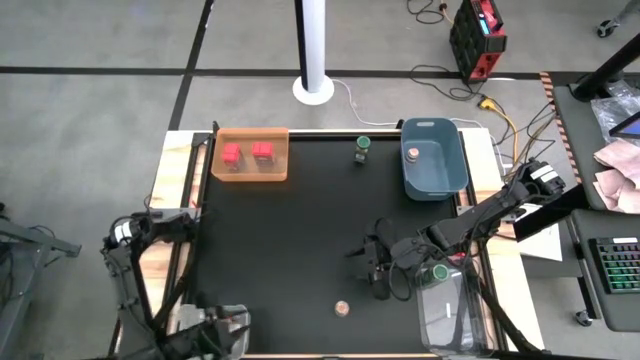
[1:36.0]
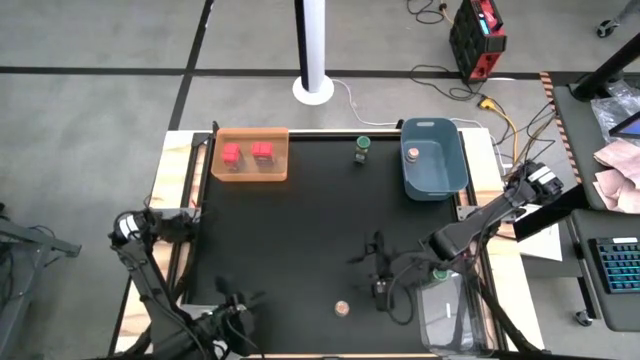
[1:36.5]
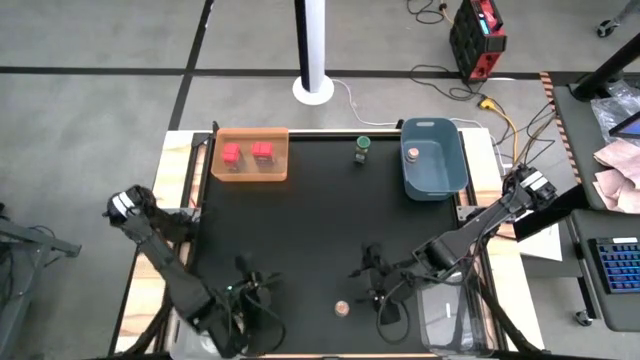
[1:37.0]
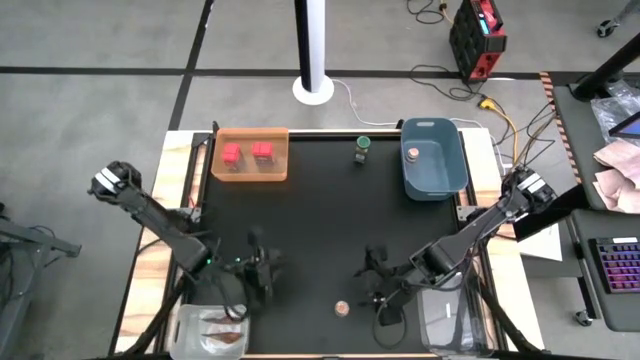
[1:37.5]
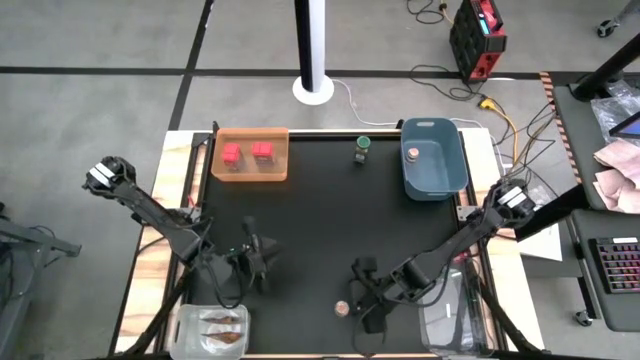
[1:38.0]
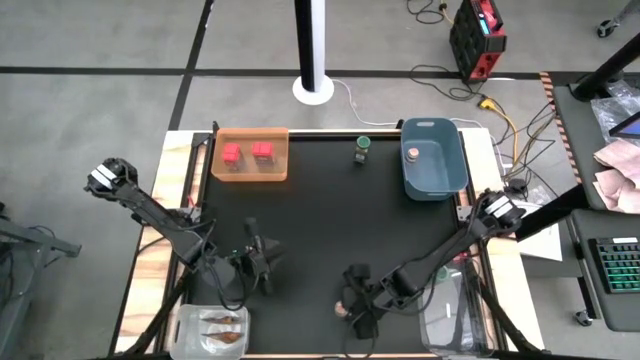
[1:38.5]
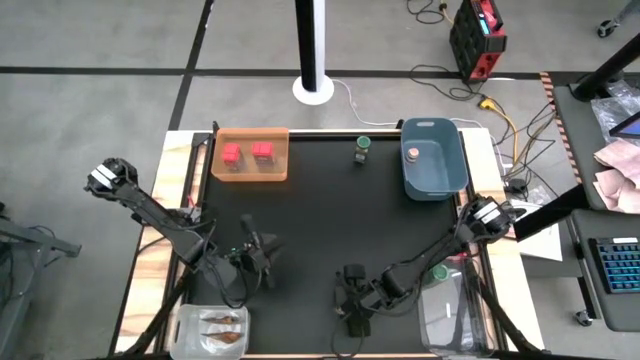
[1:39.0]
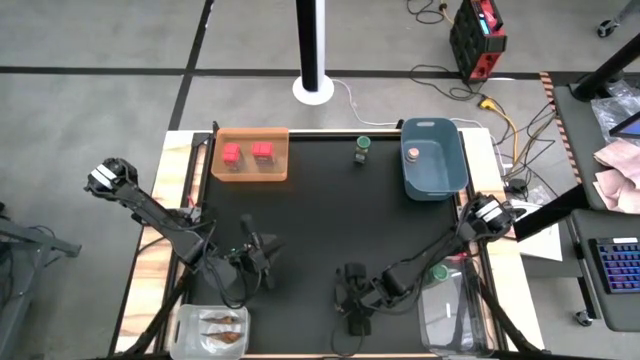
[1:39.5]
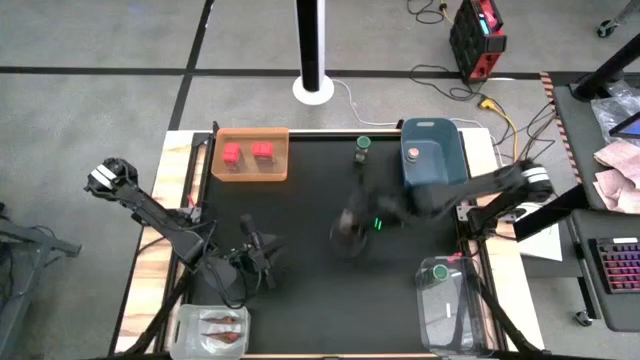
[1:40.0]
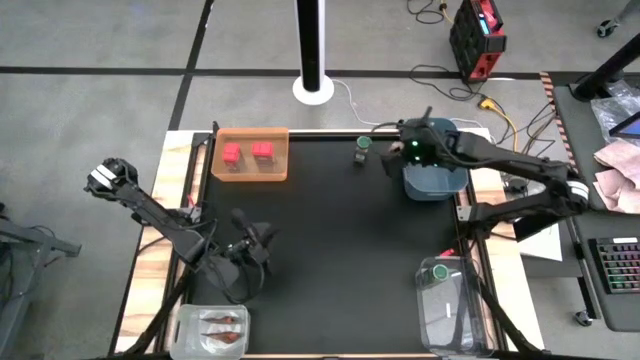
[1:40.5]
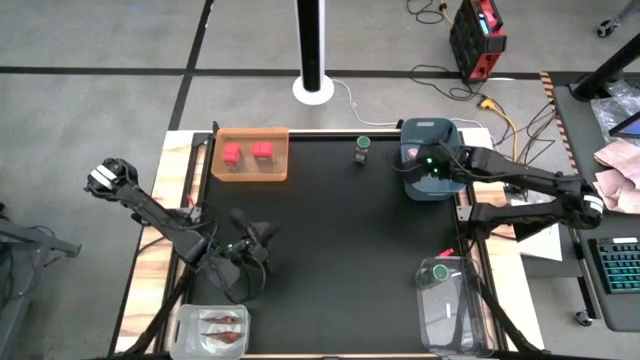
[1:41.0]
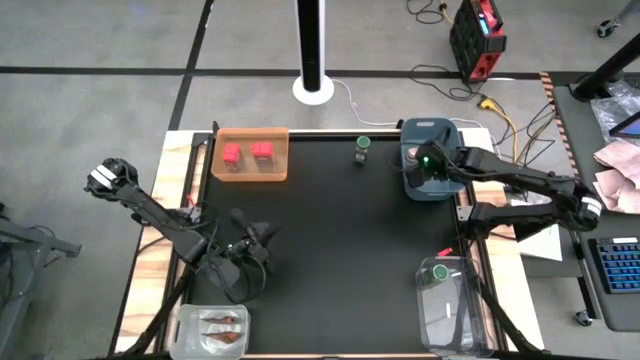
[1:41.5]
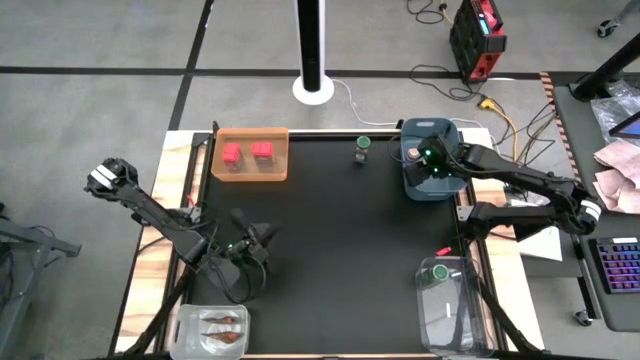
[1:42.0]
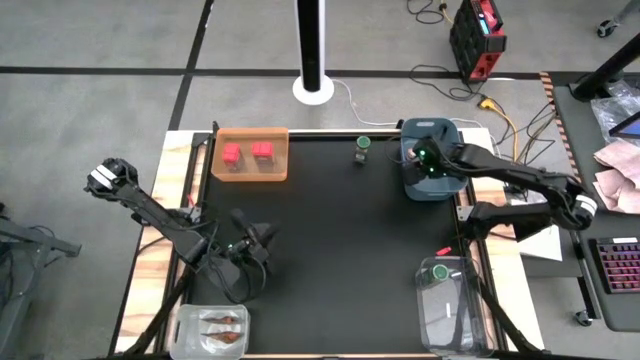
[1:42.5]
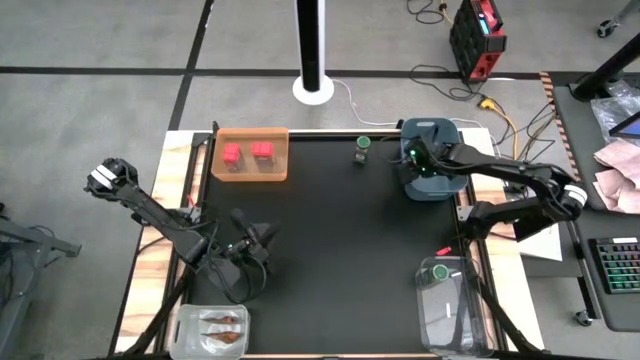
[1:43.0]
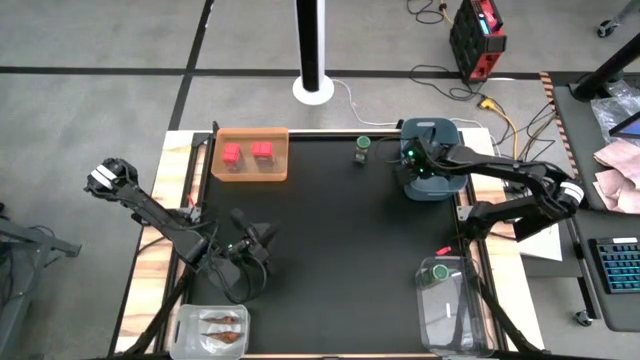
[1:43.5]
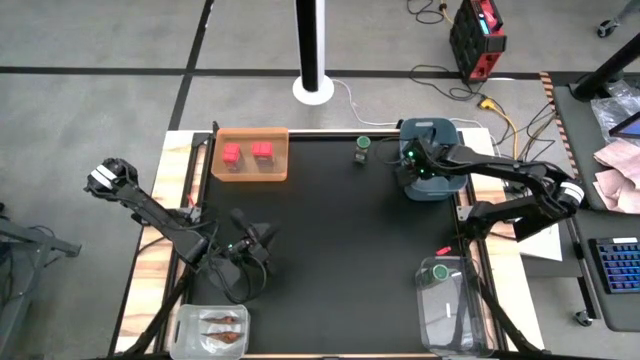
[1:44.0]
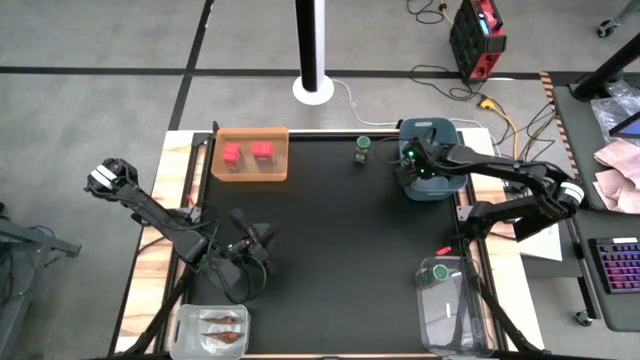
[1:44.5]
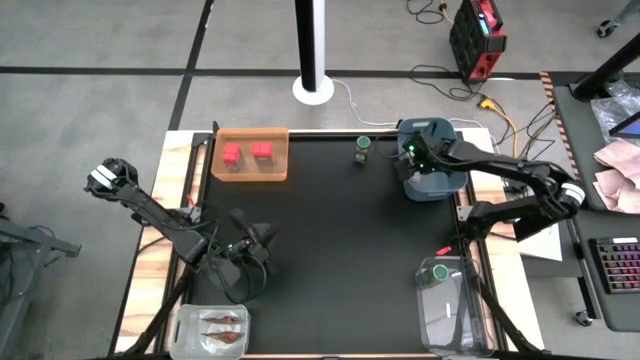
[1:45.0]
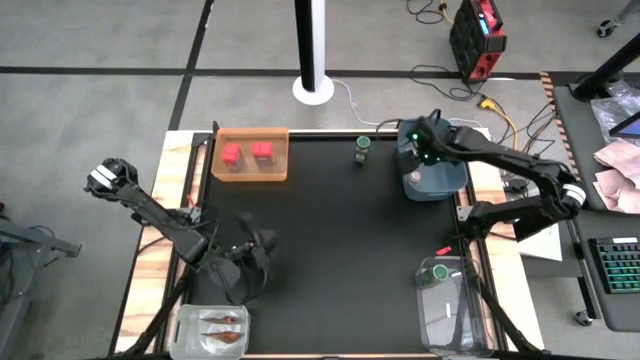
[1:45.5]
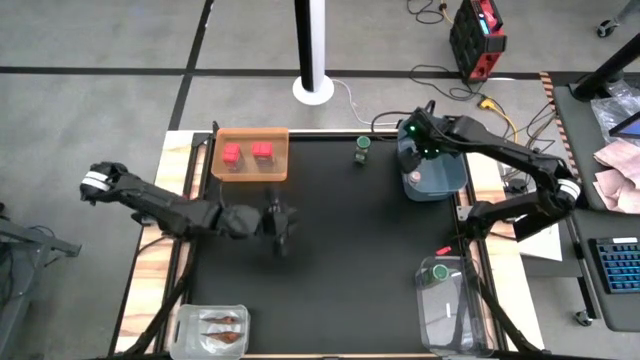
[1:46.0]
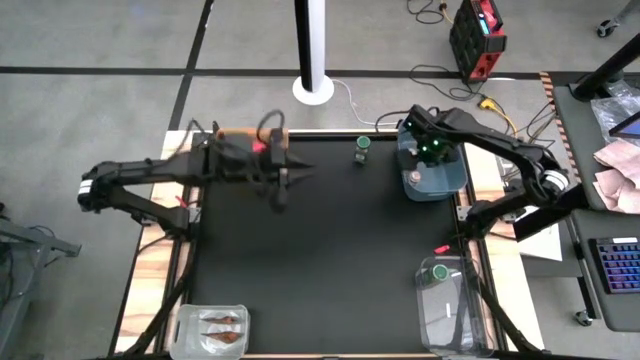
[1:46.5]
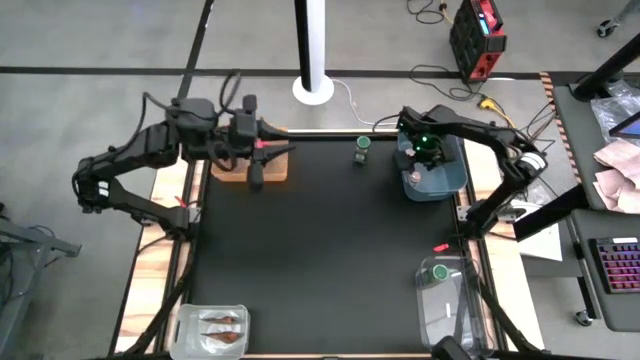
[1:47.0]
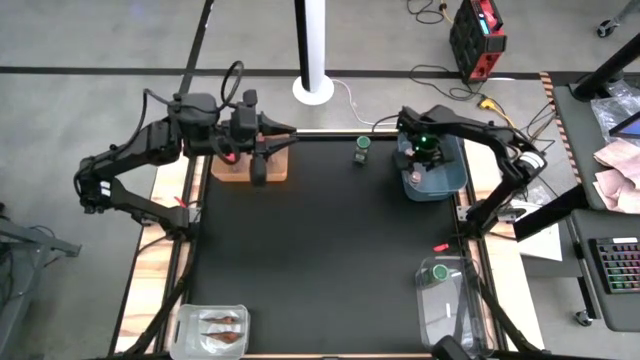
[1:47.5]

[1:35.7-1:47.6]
Task: Sort spices by type
Put the brown seasoning bottle into the blue bin

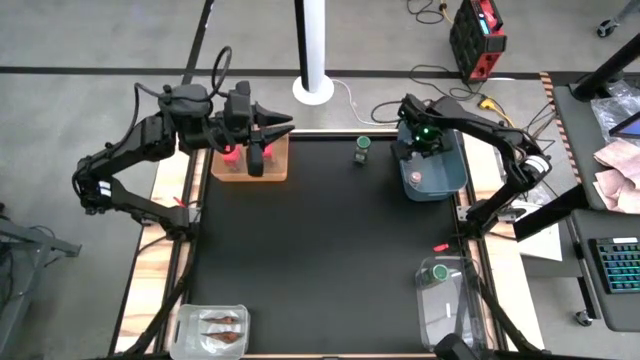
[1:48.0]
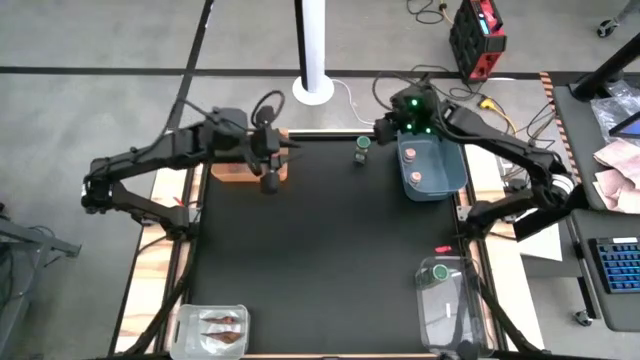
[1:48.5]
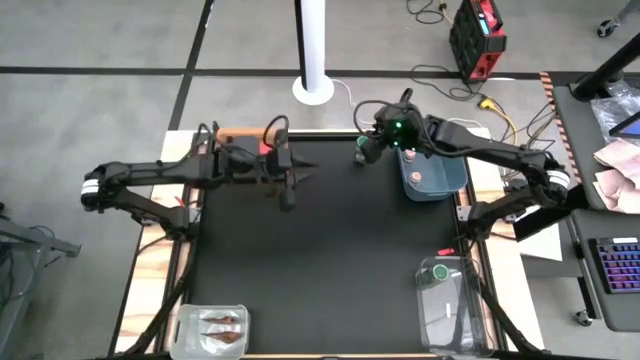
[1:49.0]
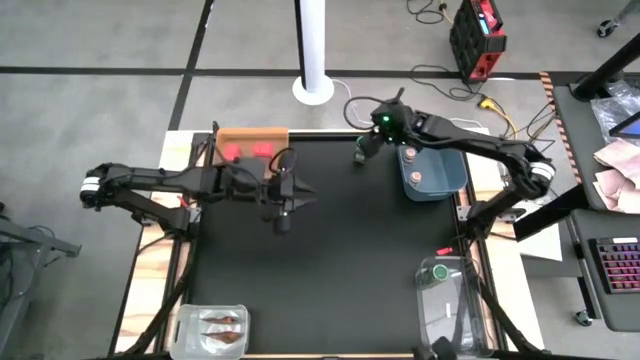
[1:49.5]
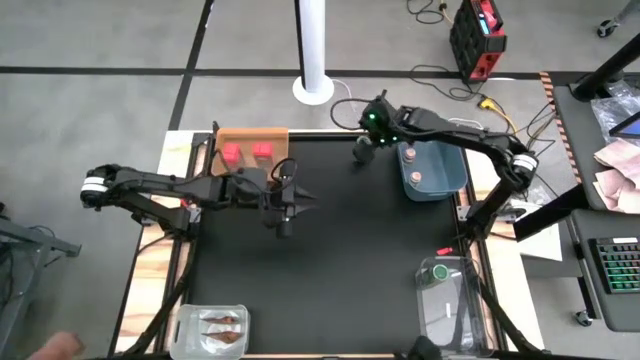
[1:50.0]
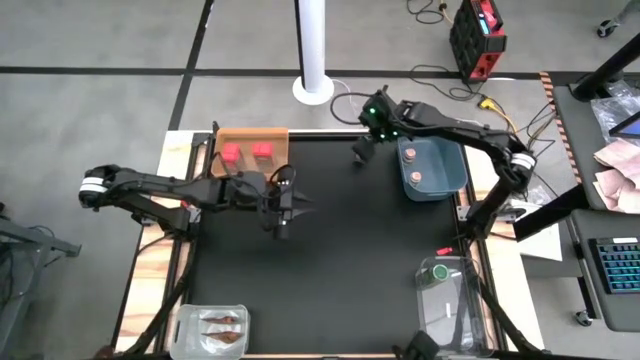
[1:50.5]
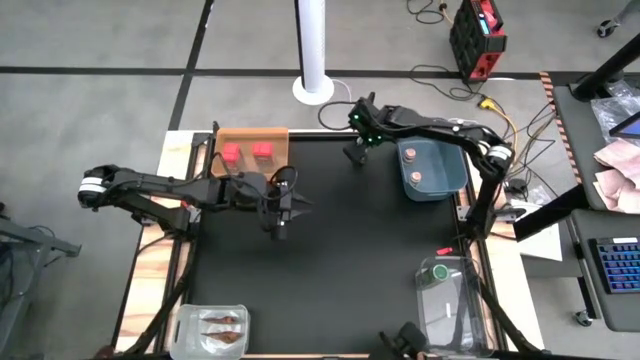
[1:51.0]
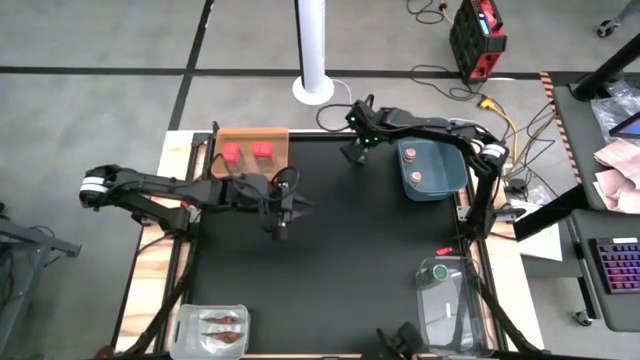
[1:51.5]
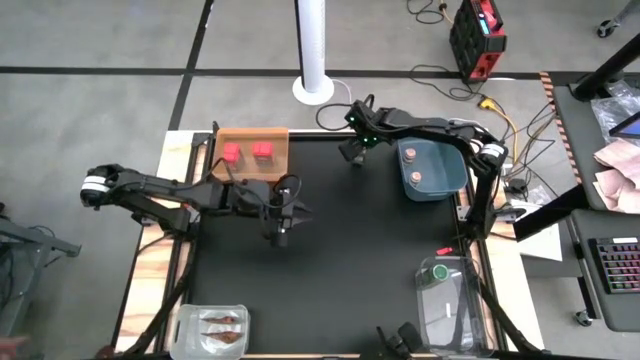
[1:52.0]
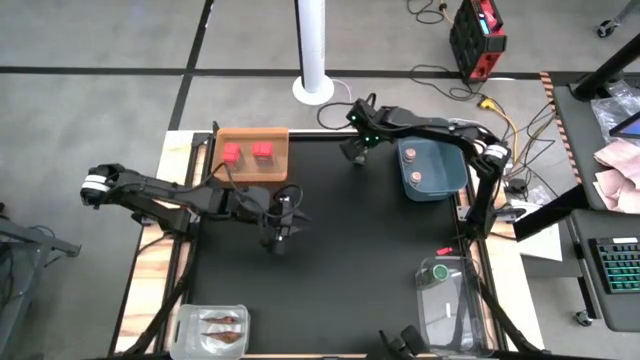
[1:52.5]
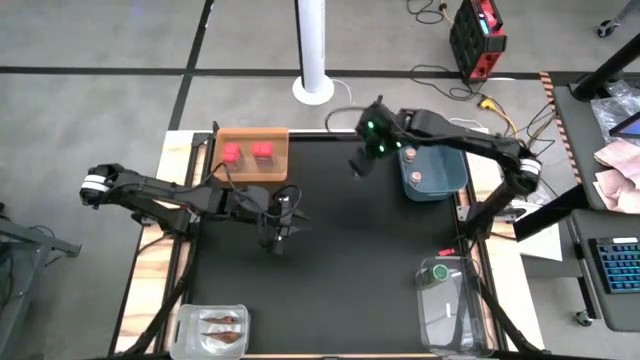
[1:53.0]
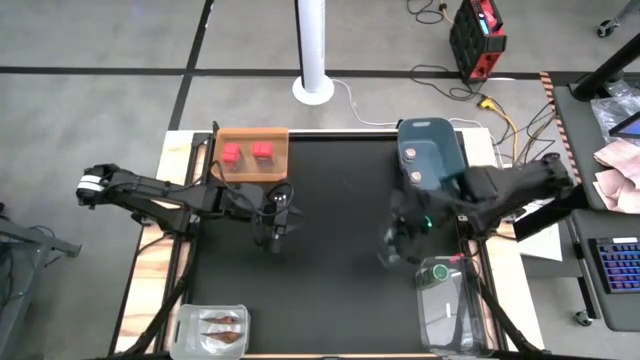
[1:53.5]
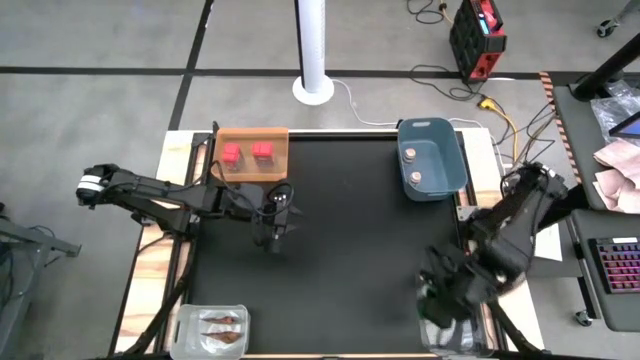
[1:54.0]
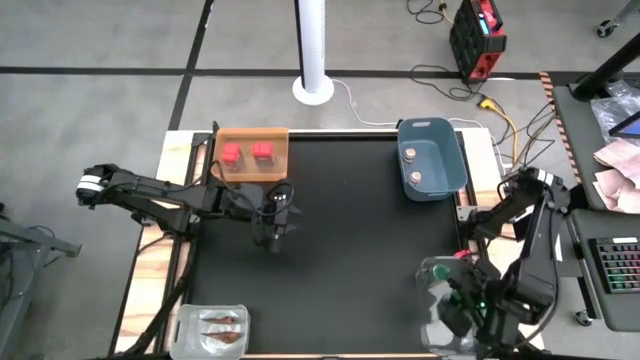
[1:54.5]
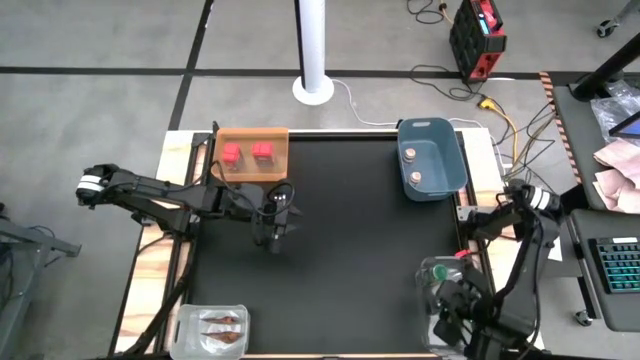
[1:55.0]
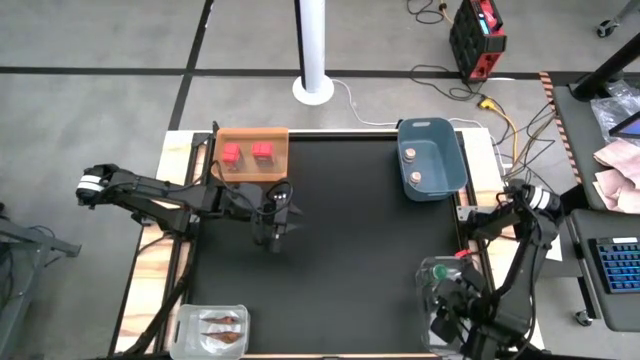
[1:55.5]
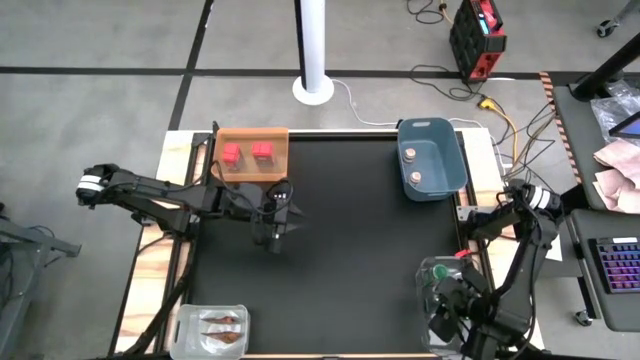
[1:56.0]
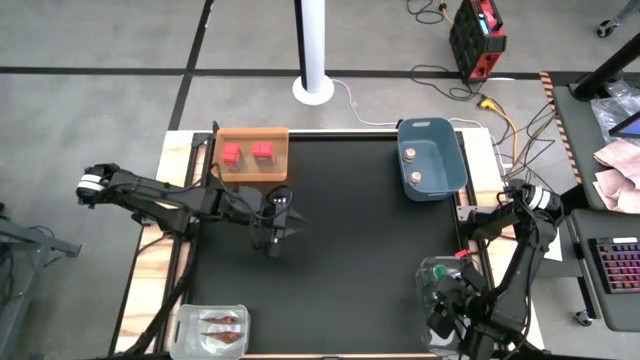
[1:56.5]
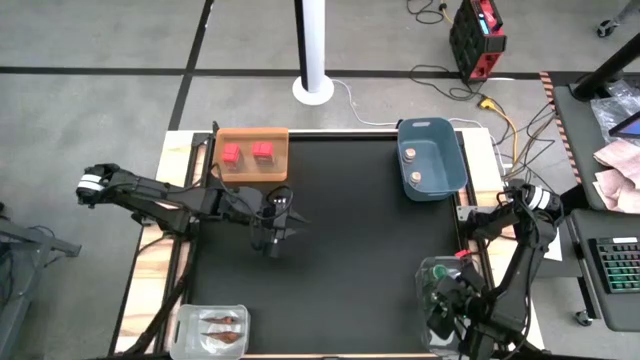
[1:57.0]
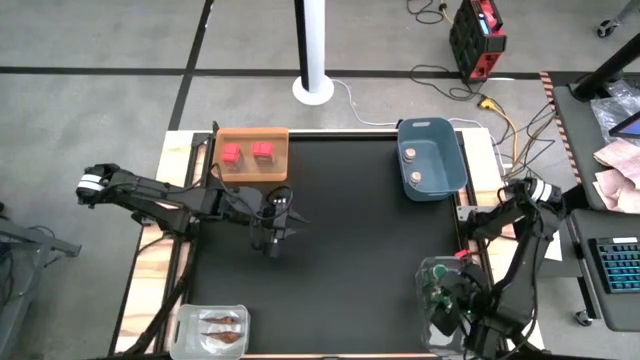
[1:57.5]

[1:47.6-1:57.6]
Put the green seasoning bottle into the transparent bin
